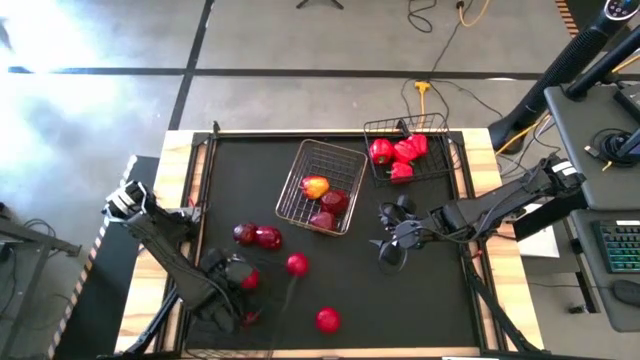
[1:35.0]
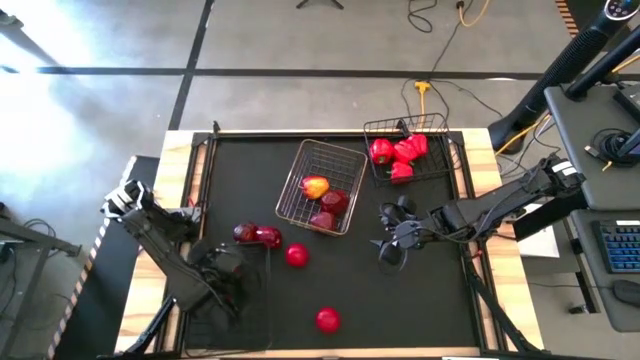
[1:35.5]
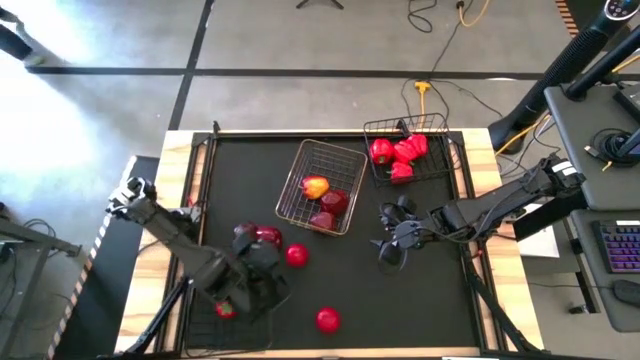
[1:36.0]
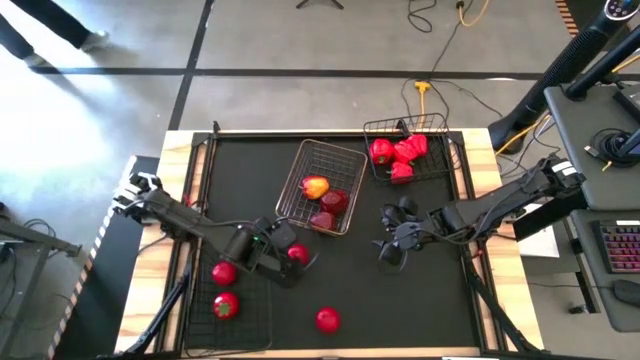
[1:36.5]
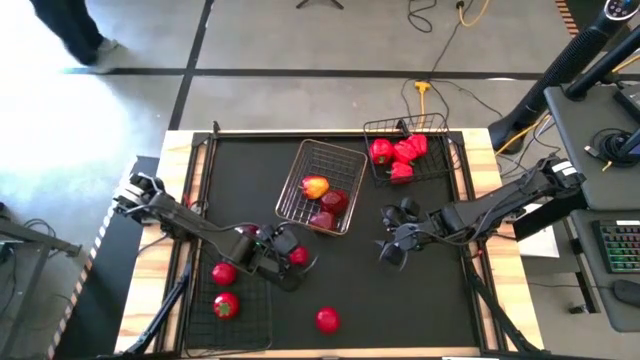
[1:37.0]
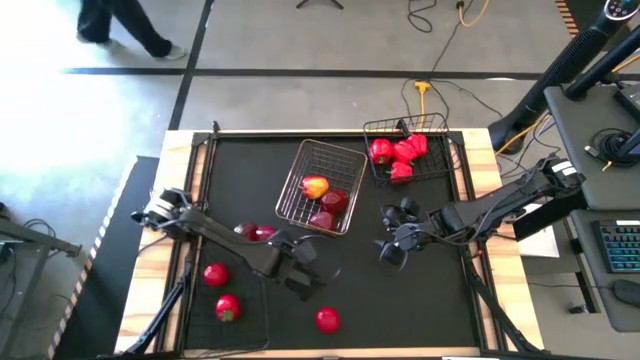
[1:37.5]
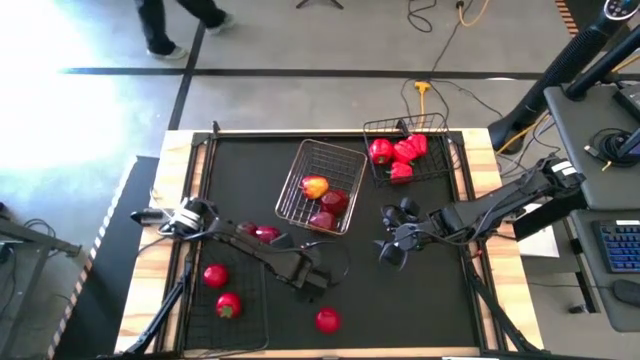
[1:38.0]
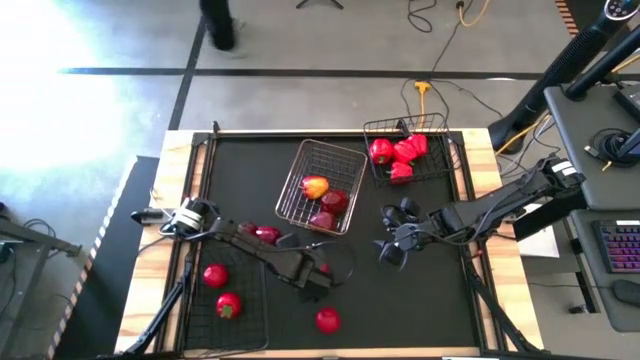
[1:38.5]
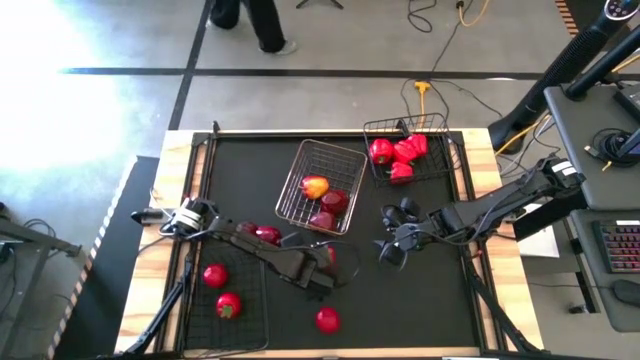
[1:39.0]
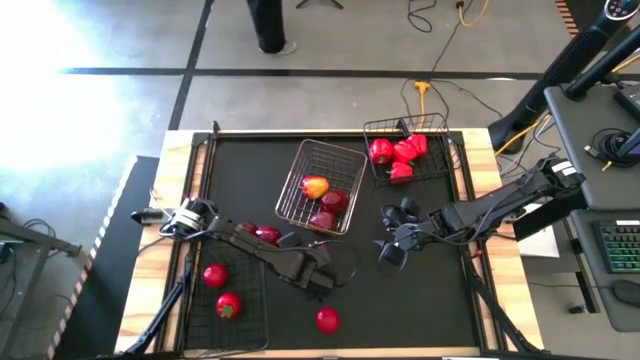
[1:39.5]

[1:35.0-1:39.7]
Task: Sort produce into baskets
Put the red tomato into the bottom black wire basket

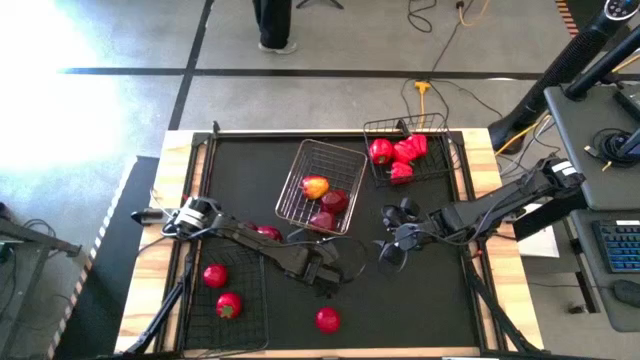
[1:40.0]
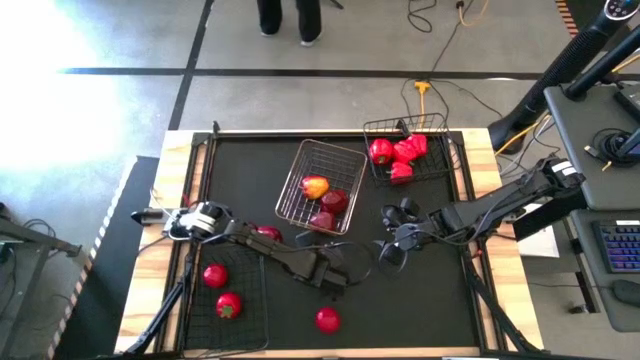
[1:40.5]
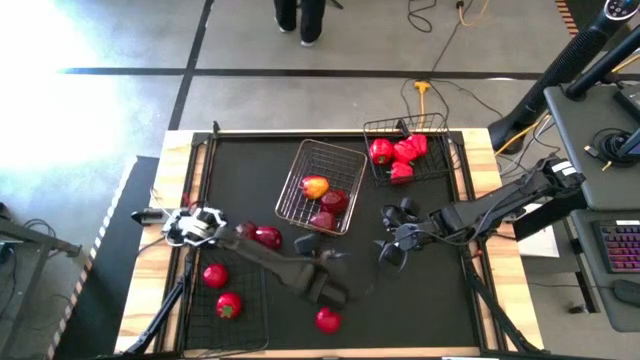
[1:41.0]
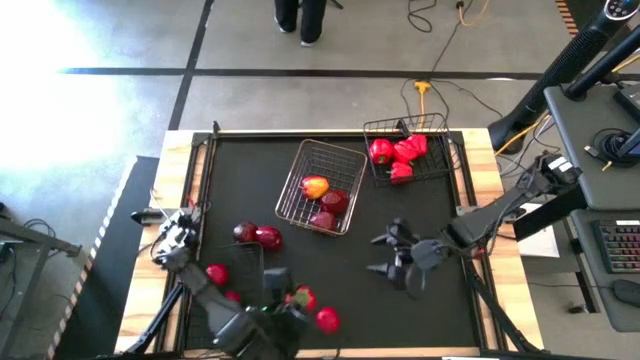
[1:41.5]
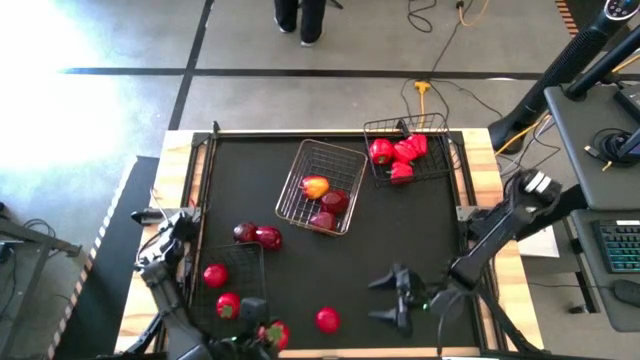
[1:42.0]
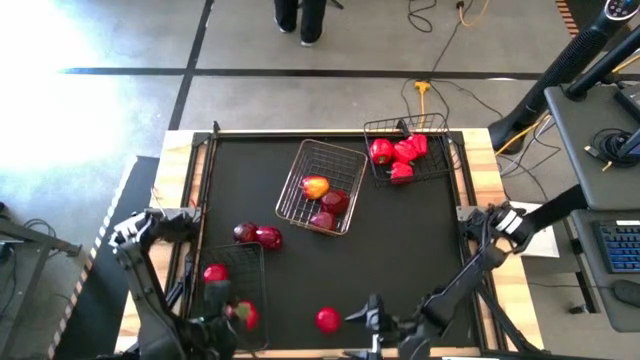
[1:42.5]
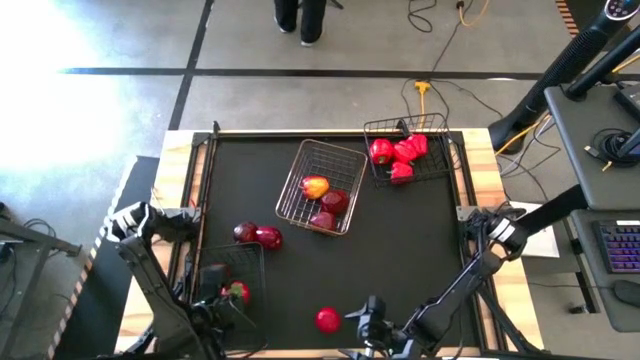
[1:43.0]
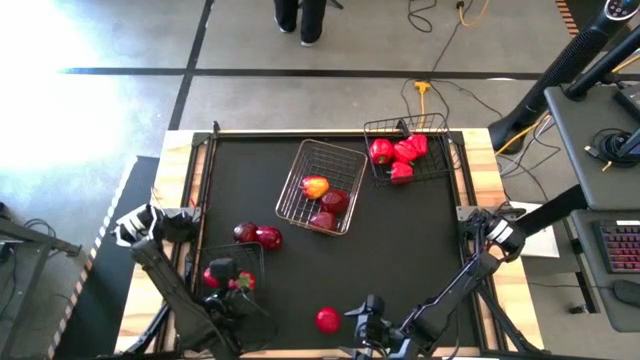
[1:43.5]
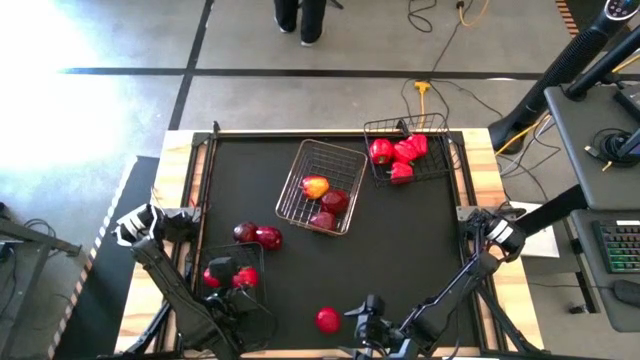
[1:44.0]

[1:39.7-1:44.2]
Put the red tomato into the bottom black wire basket

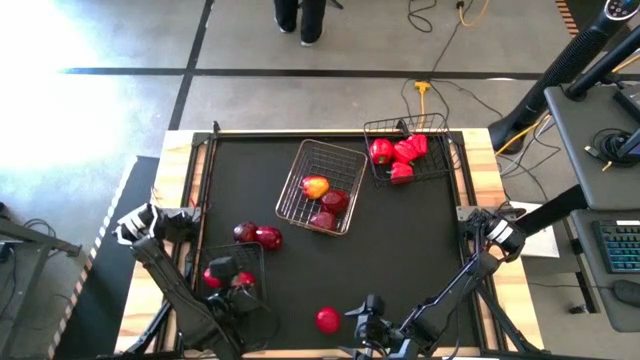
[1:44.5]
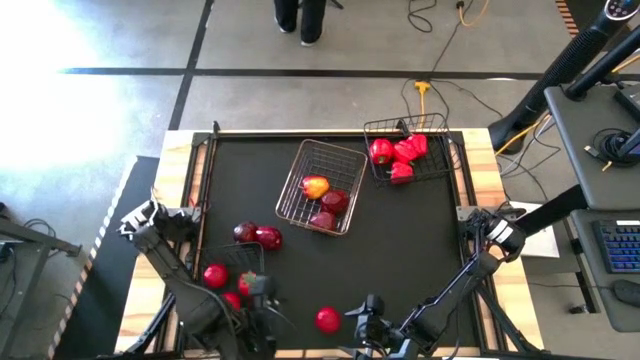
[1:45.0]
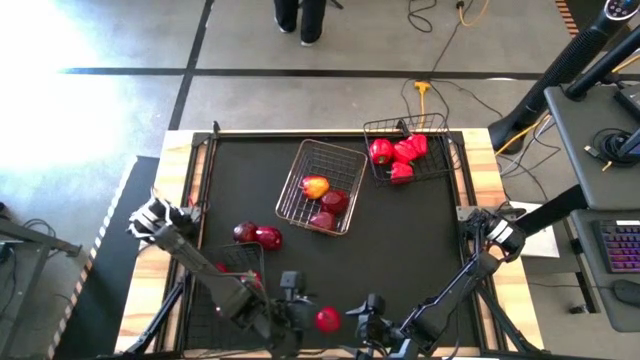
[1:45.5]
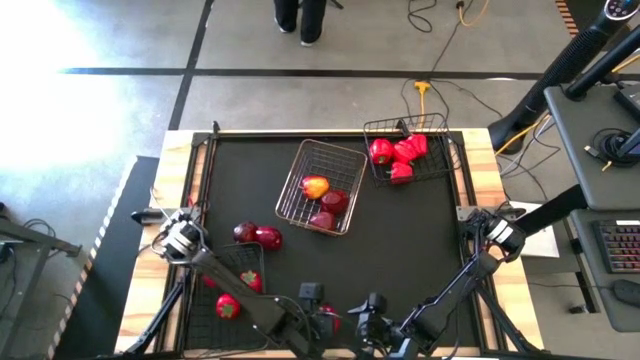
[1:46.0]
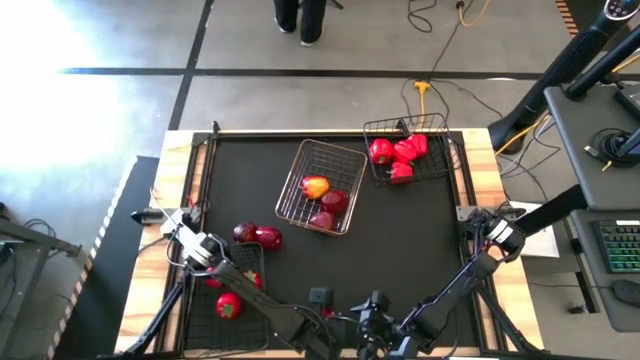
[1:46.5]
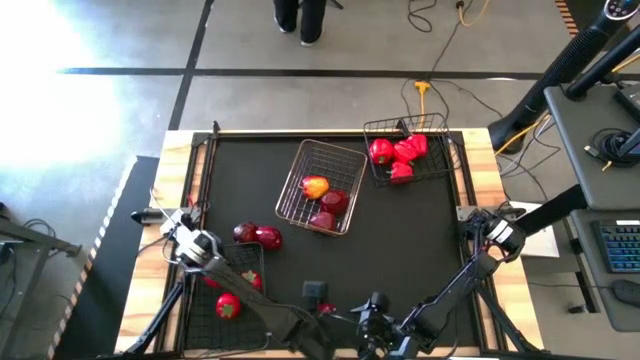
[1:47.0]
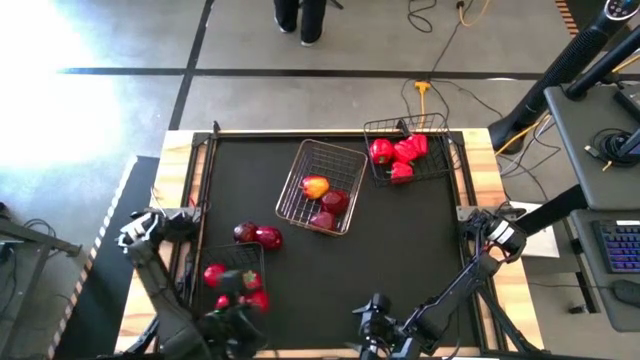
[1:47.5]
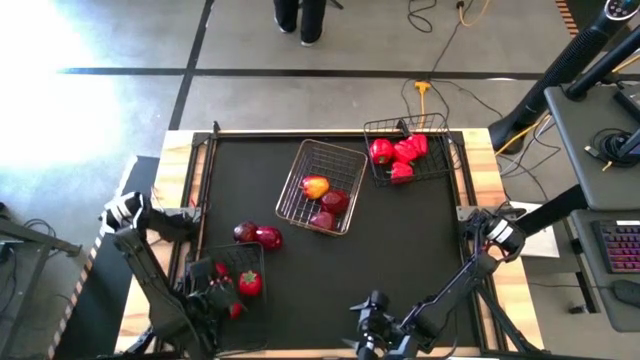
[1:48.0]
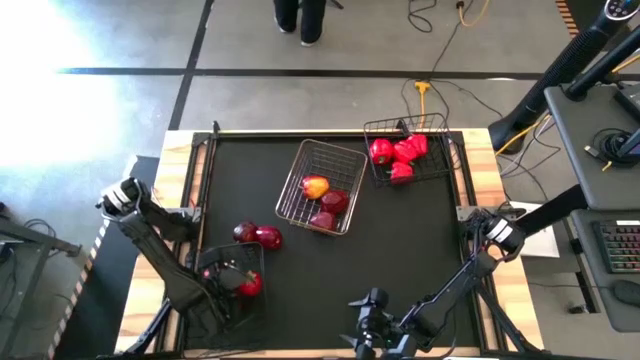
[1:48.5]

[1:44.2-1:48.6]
Put the red tomato into the bottom black wire basket

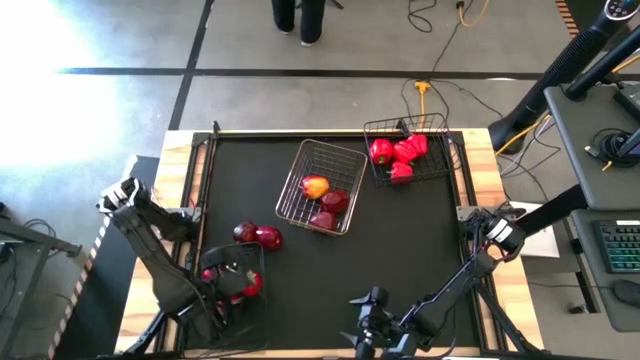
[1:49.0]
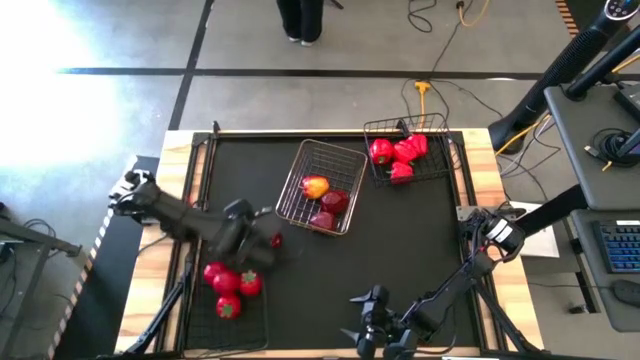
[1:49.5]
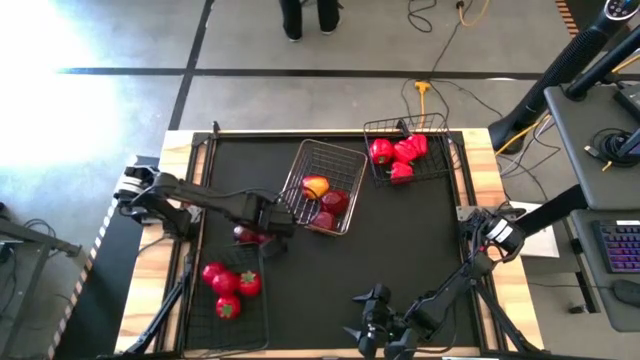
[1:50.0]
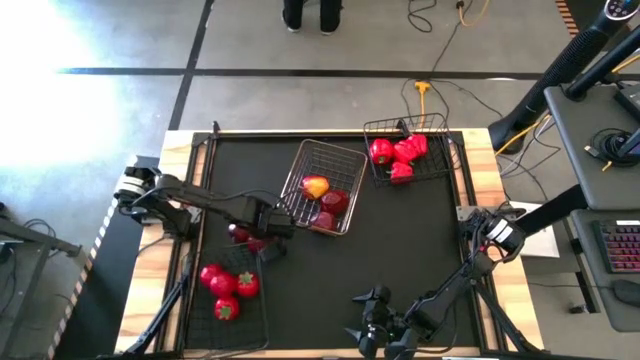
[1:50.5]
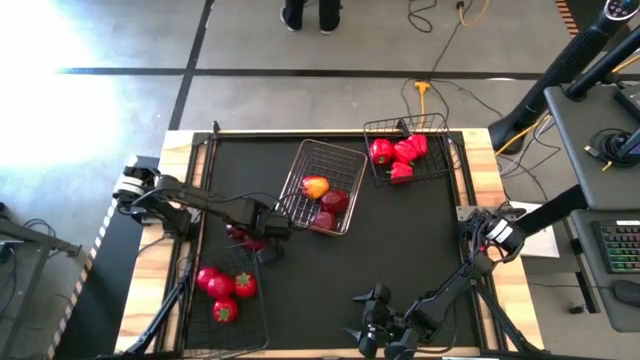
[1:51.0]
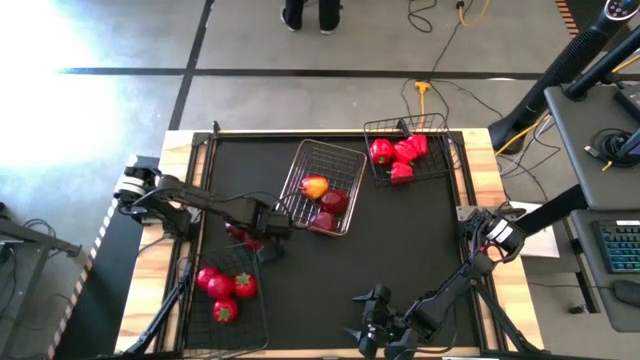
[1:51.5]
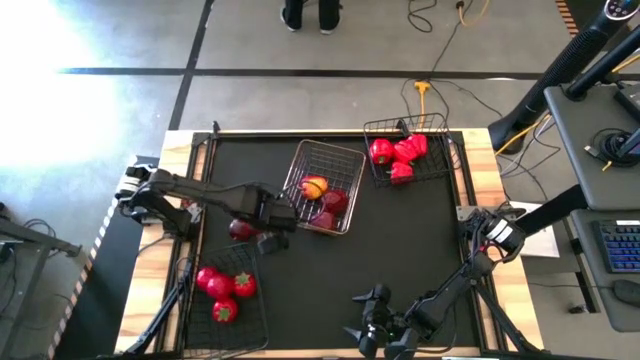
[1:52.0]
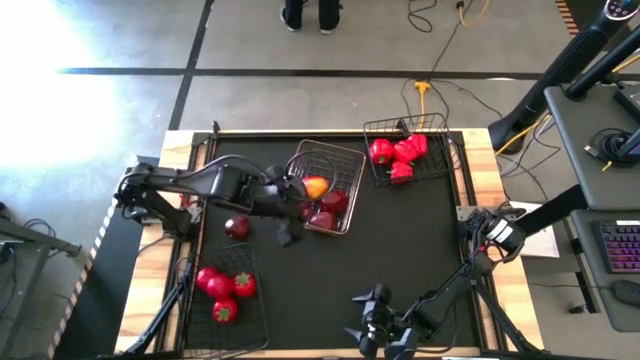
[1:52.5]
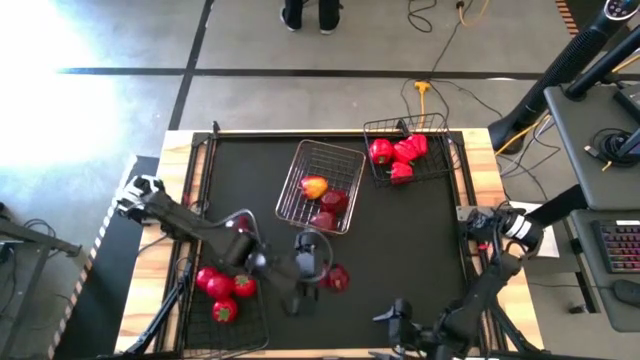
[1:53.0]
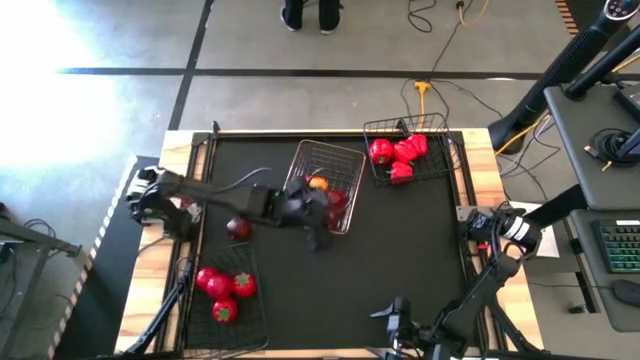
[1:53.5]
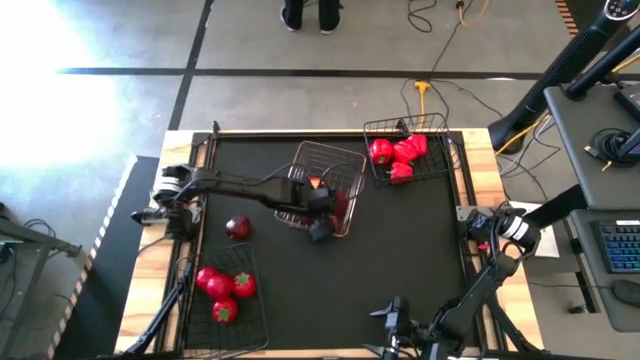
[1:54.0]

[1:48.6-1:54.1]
Put the red apple into the gold wire basket

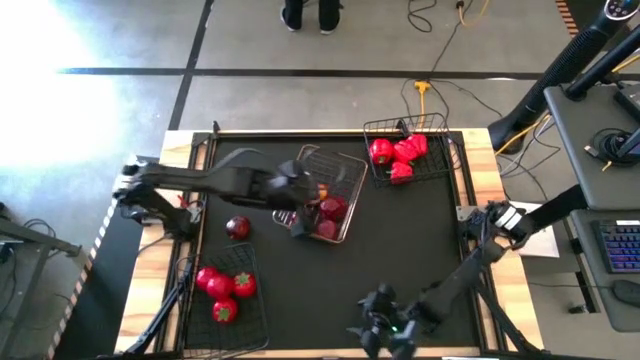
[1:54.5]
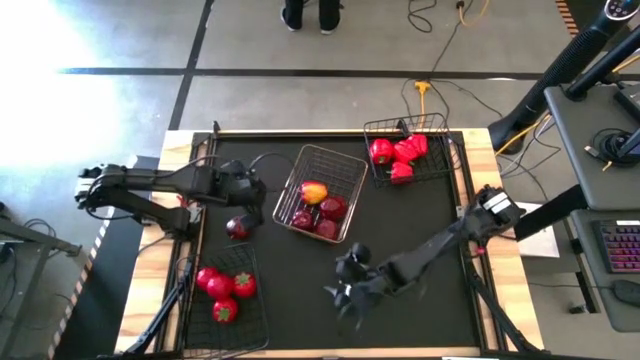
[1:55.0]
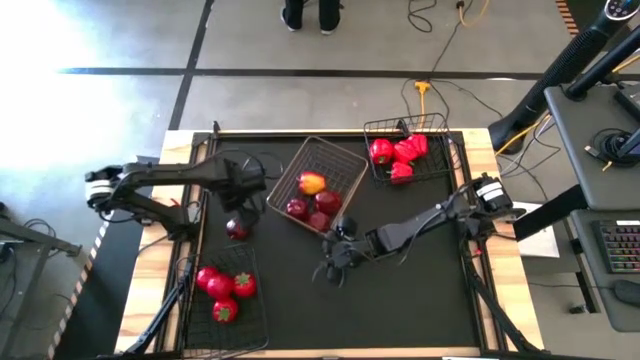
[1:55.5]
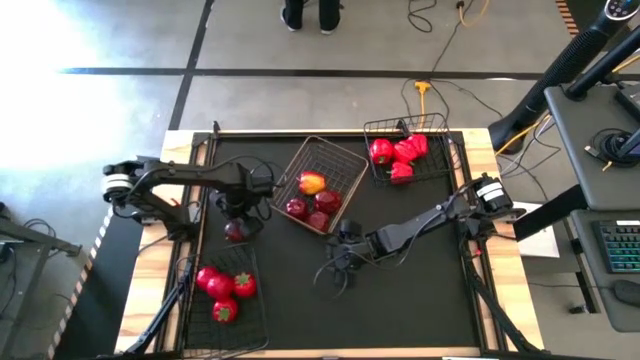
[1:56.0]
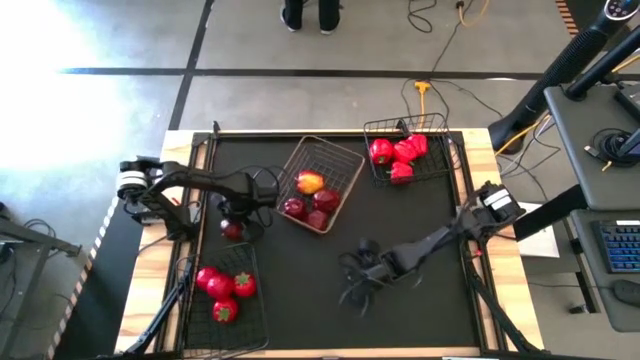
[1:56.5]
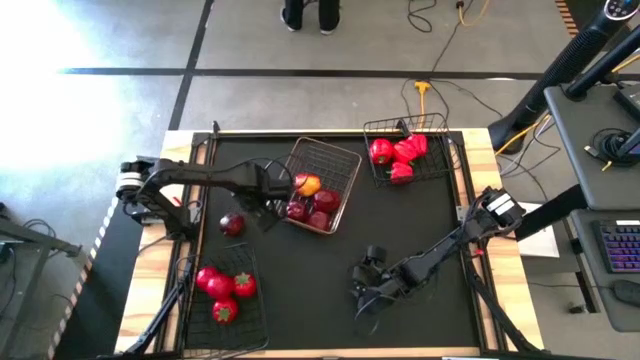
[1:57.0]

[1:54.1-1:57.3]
Put the red apple into the gold wire basket
